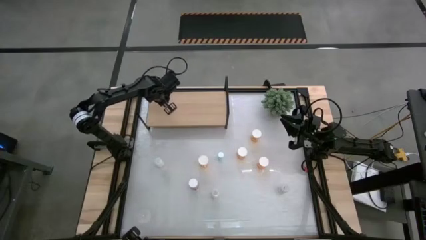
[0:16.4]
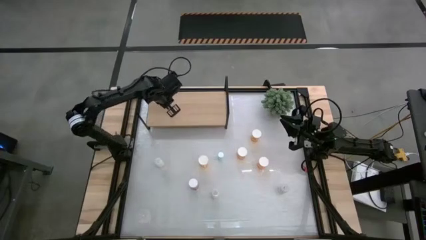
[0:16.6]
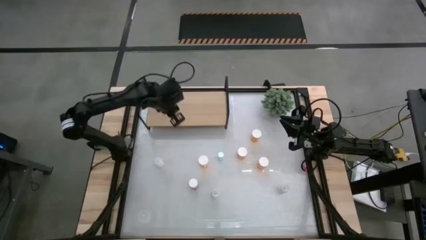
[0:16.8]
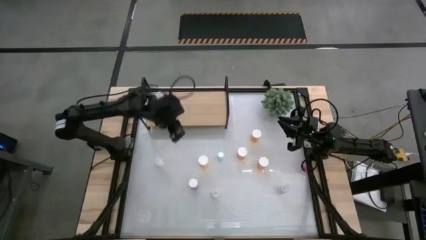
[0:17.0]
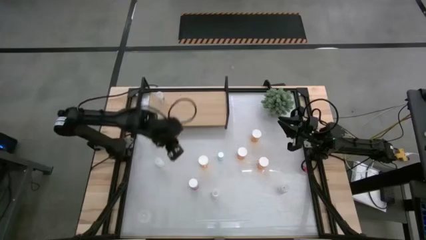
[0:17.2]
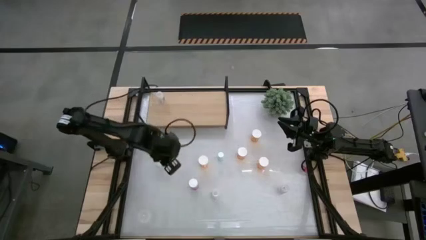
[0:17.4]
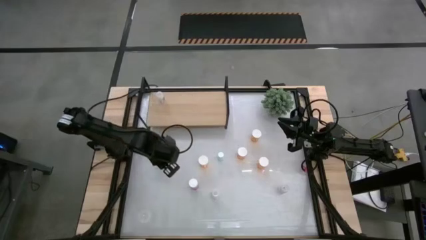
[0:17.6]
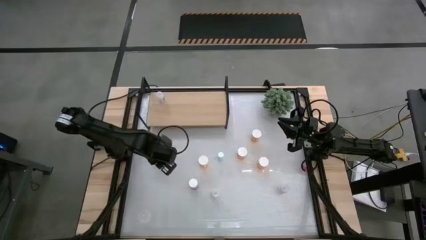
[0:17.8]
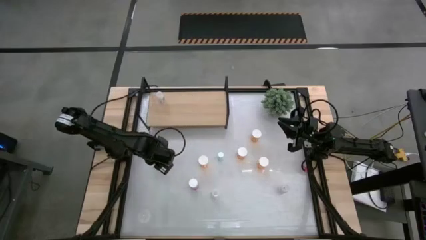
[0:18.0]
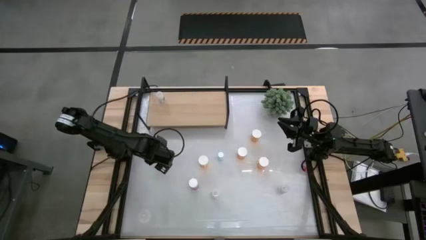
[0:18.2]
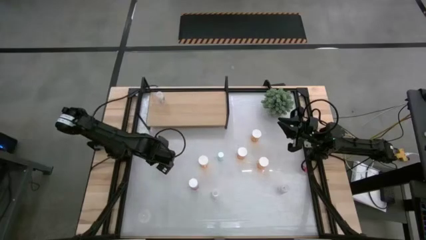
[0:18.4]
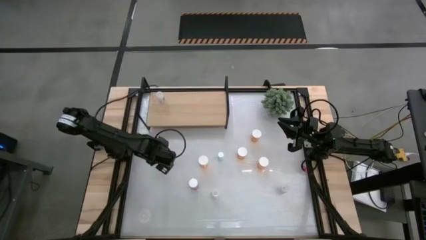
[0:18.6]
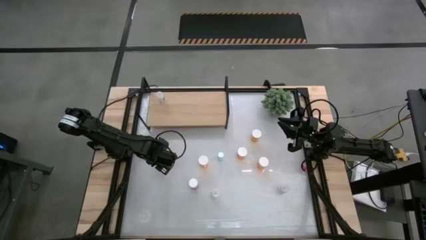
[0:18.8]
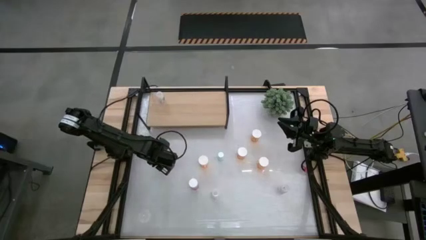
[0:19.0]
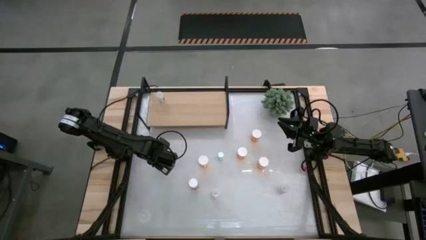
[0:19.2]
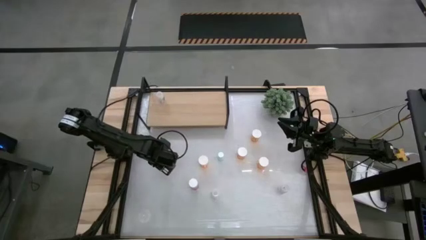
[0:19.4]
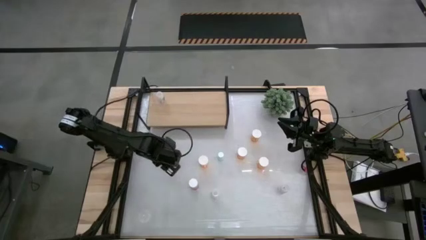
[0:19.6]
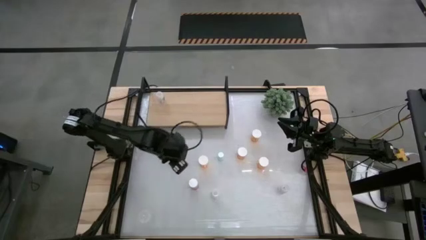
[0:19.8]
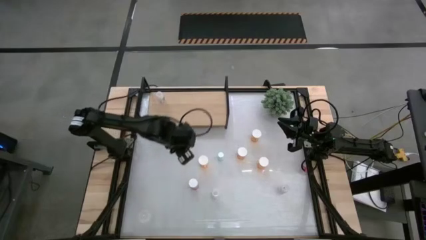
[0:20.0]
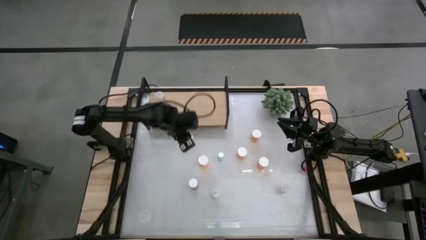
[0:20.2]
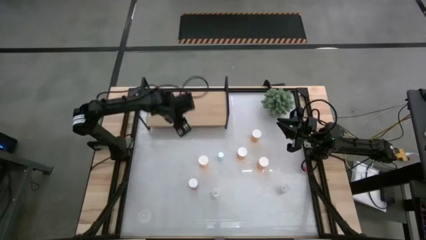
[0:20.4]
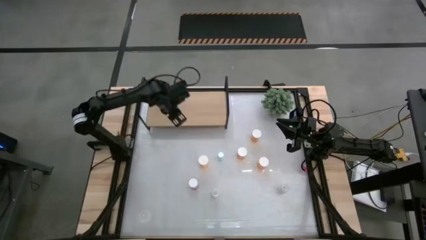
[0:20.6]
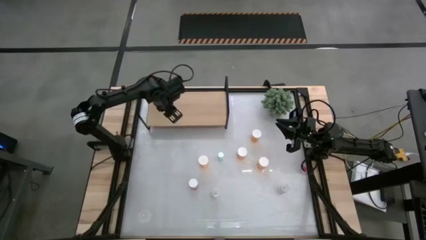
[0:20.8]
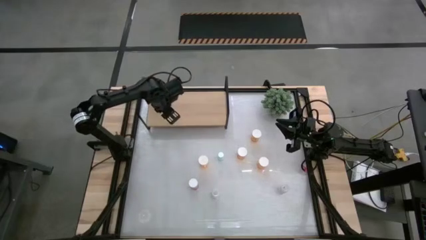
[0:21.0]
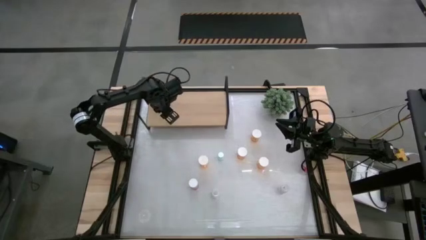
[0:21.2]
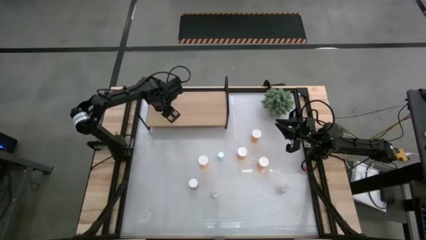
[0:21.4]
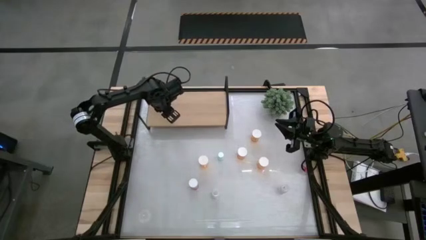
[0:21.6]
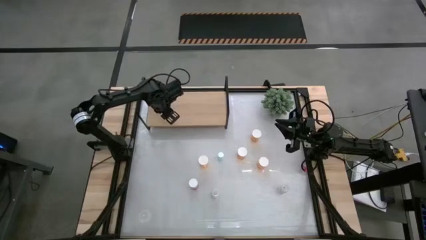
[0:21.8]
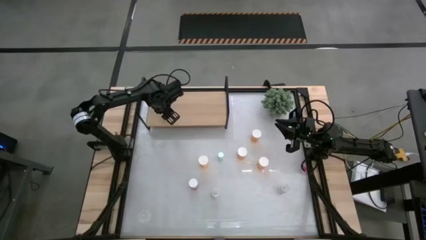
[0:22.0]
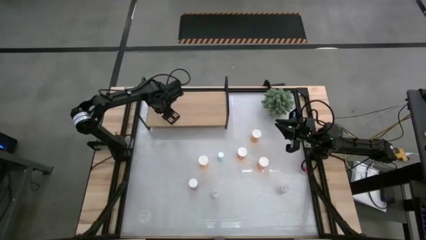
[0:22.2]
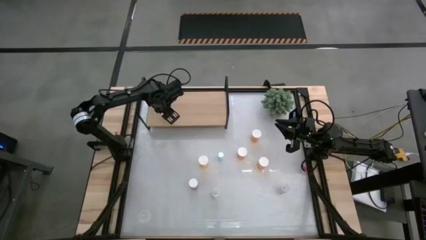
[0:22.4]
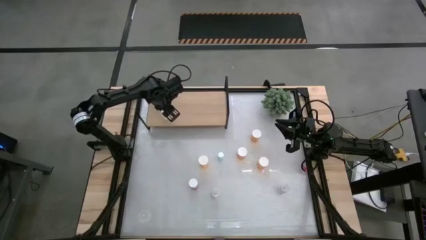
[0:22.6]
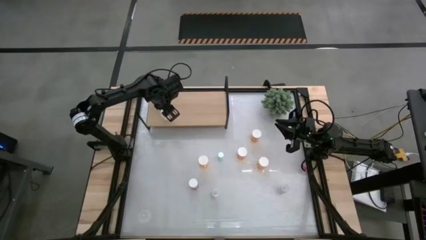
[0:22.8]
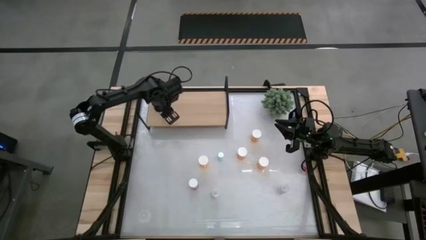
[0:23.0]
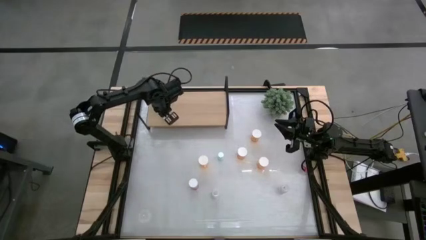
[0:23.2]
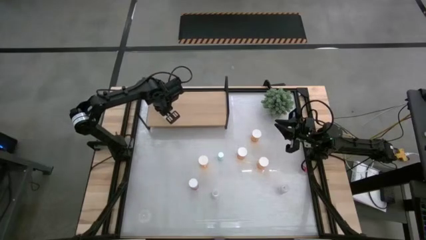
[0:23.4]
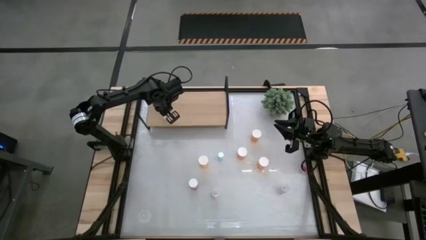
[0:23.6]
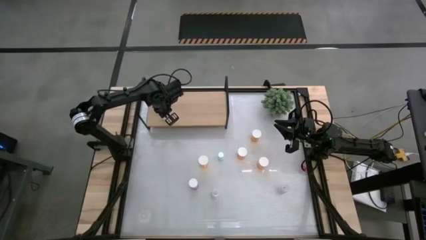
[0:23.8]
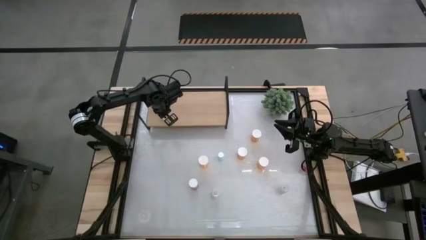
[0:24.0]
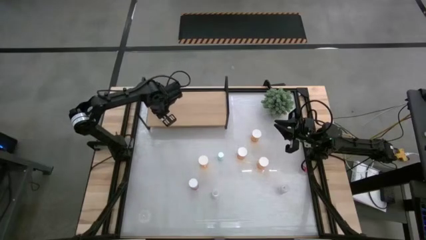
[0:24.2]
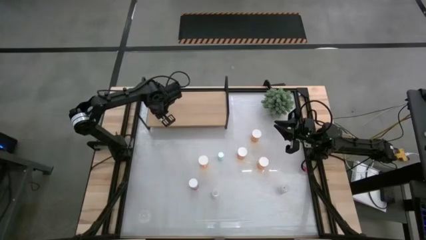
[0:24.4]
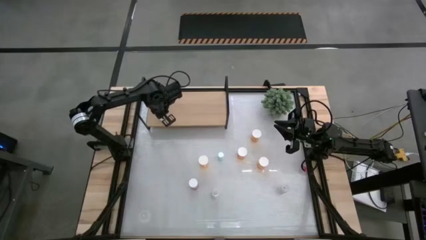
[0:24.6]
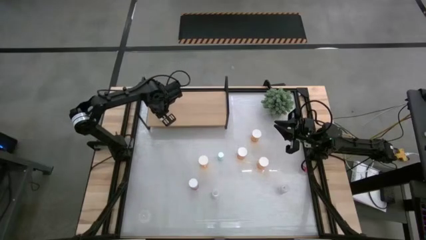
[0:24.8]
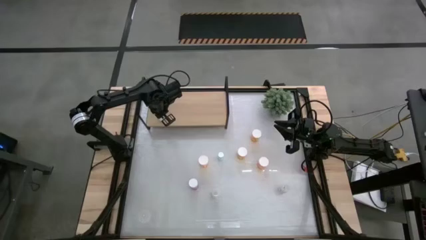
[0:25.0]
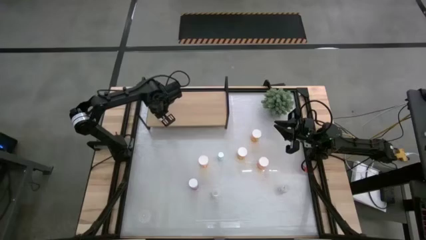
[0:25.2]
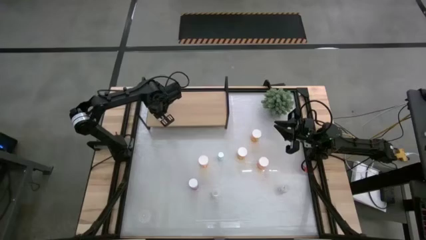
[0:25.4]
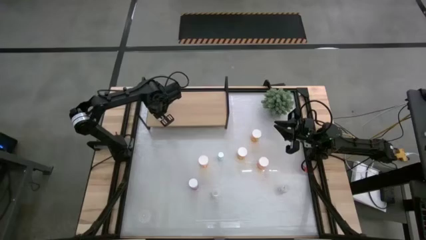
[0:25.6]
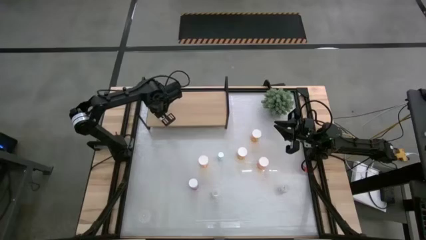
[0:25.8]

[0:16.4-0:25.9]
Task: Pick and place medicine bottles onto shelf by color
Put the left white pill bottle on the shelf

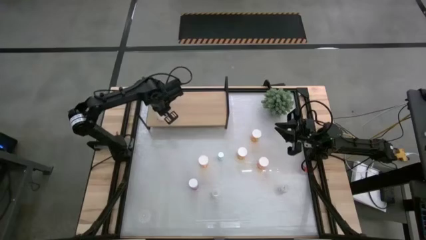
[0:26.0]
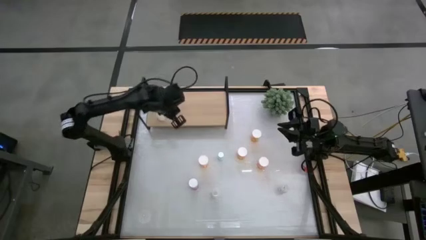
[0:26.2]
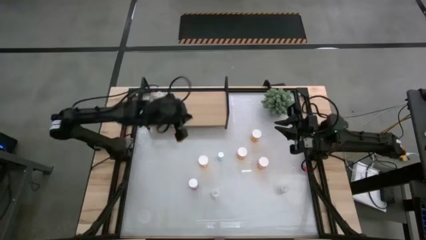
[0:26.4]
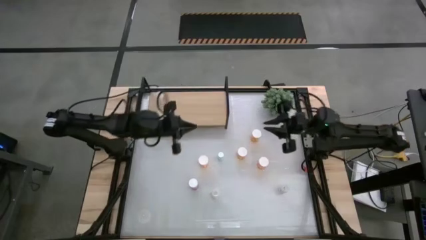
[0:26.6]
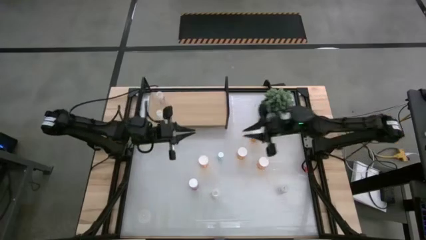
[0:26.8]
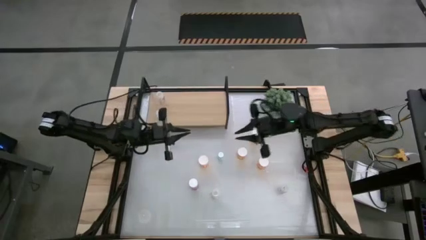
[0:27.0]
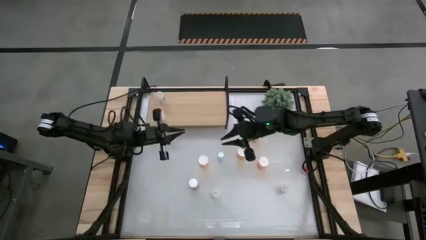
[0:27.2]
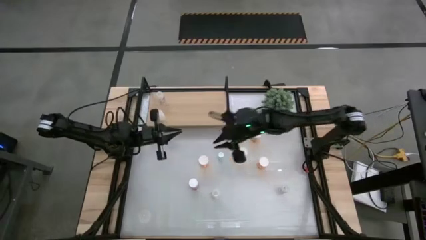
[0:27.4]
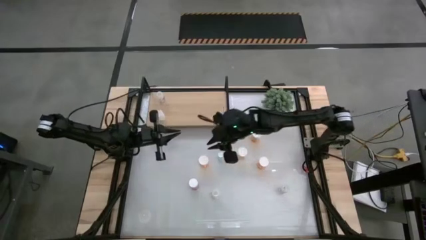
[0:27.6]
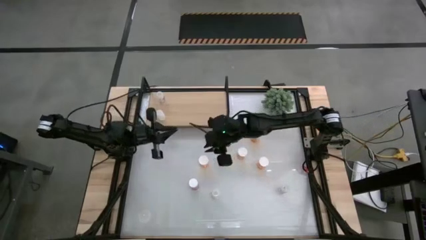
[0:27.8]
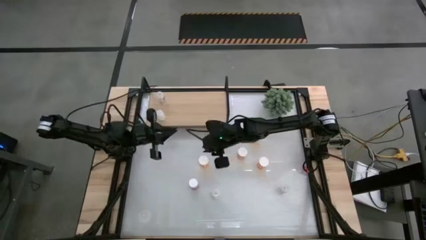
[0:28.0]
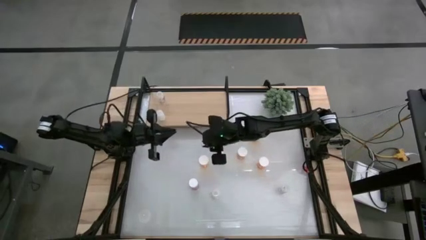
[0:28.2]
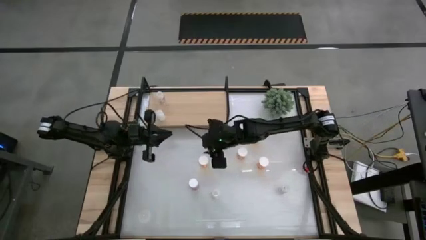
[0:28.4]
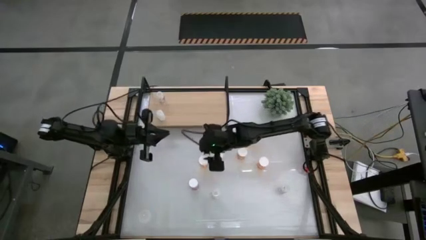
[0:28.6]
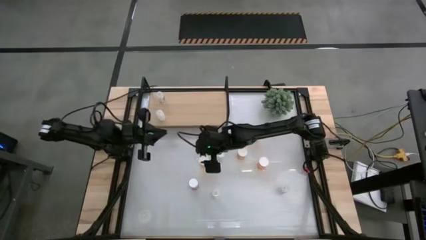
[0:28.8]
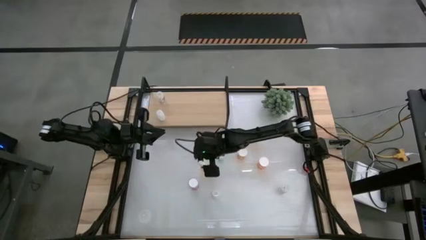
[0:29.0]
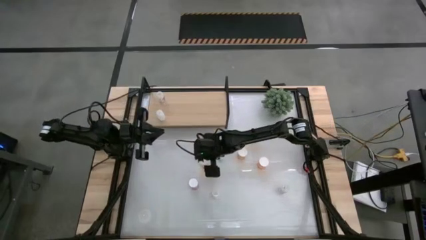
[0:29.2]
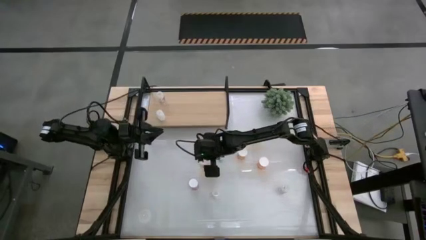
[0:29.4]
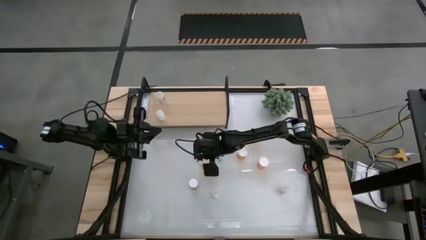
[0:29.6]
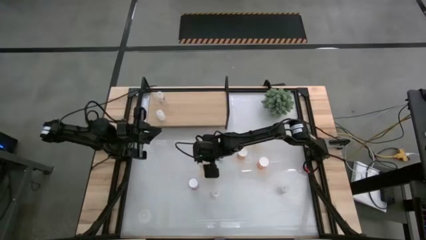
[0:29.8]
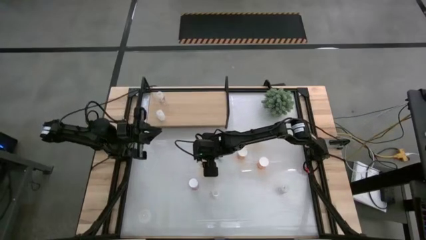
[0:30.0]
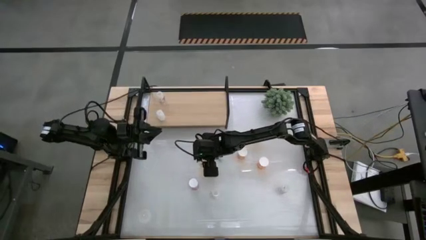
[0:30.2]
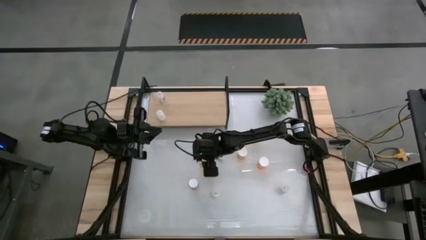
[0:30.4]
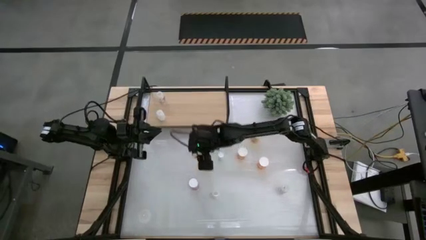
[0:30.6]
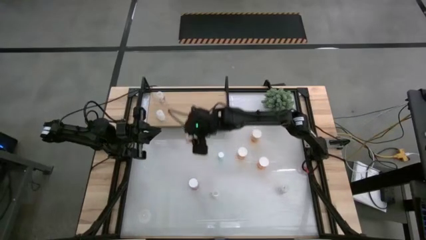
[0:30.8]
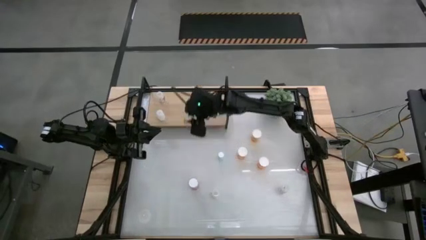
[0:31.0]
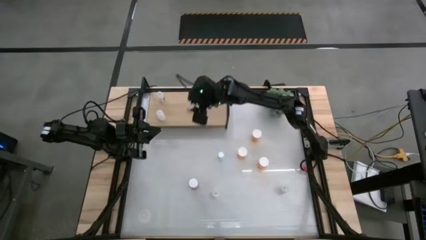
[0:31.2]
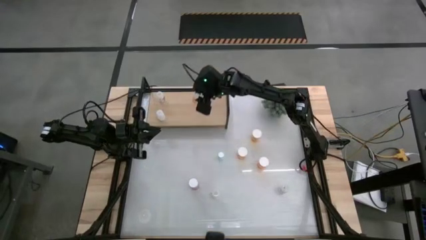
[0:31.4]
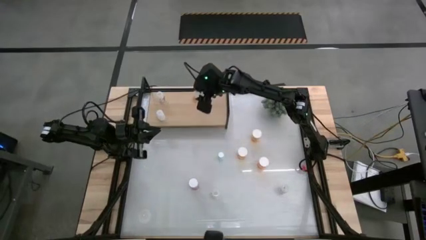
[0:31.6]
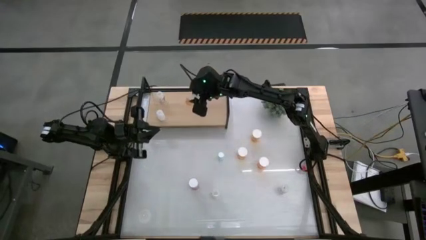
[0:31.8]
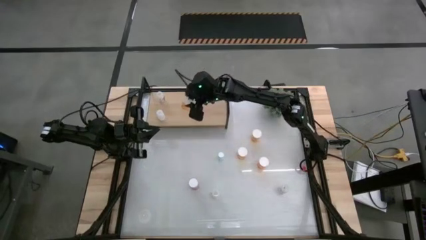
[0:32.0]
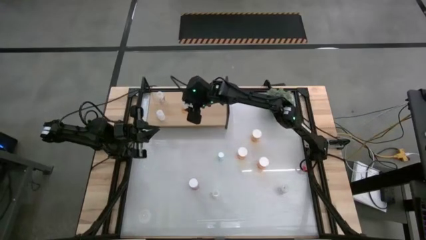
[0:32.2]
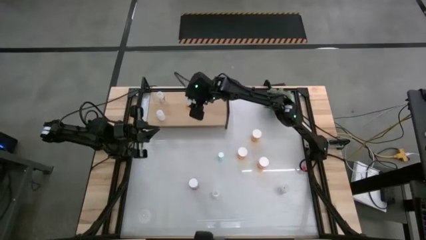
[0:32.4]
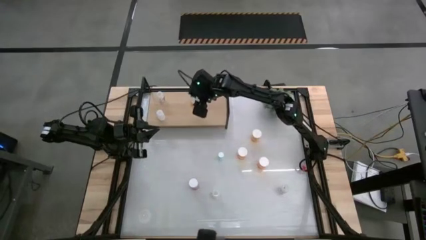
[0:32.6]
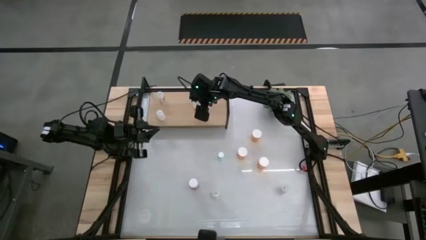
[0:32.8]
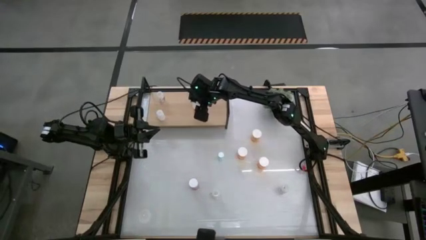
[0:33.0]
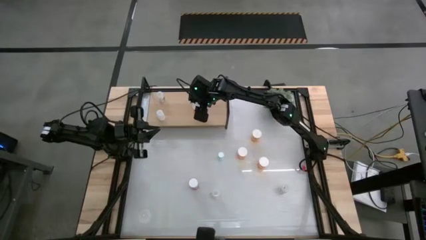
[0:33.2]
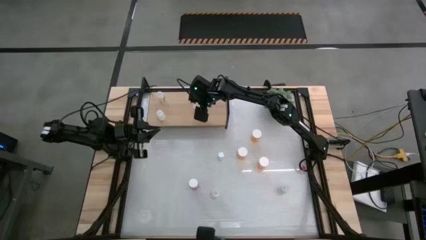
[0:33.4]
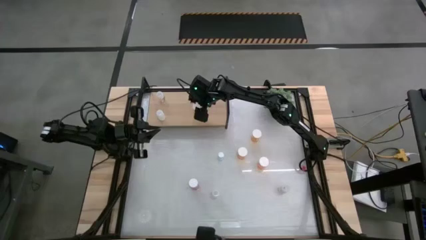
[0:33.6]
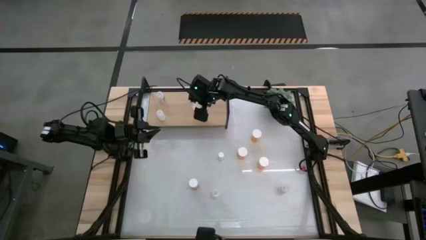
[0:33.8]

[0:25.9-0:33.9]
Put the left orange pill bottle on the shelf
